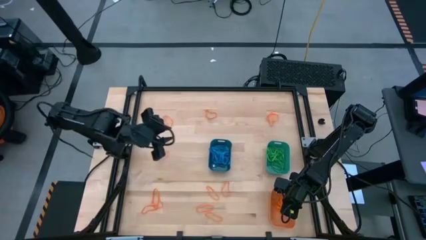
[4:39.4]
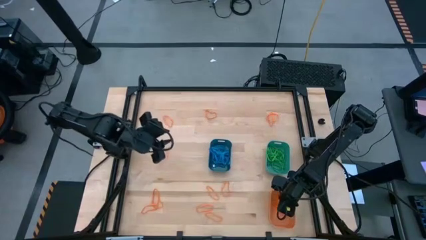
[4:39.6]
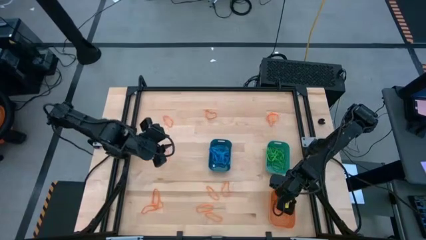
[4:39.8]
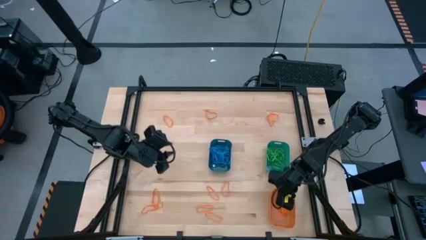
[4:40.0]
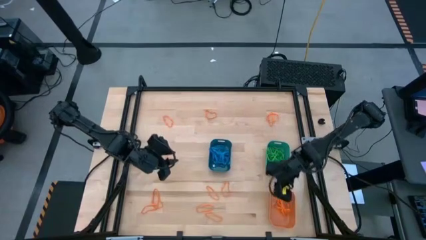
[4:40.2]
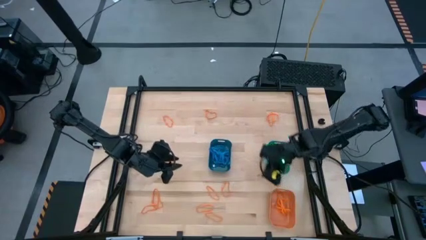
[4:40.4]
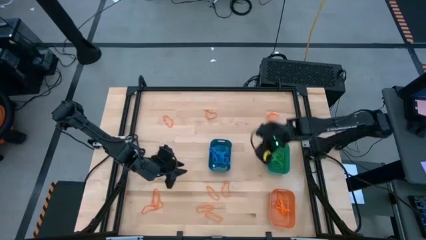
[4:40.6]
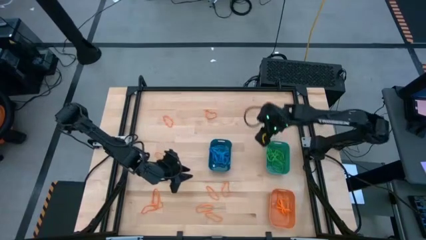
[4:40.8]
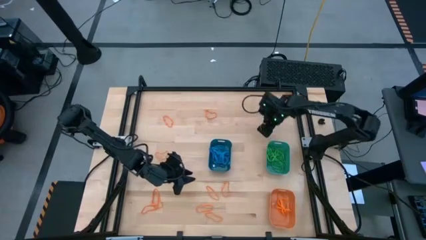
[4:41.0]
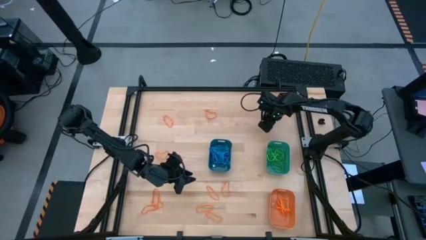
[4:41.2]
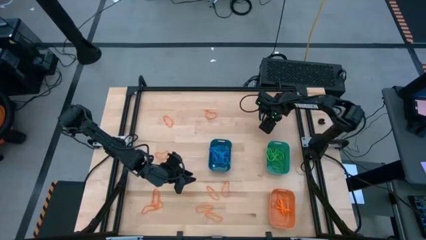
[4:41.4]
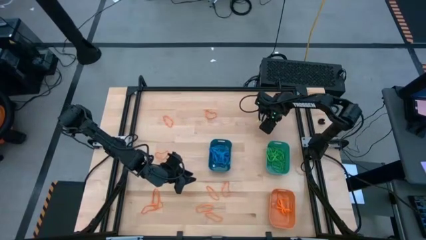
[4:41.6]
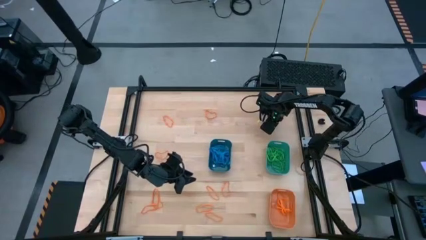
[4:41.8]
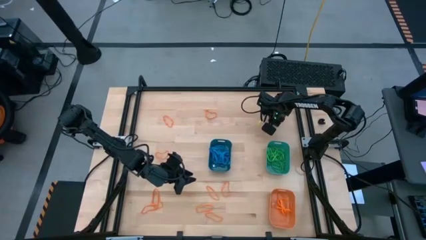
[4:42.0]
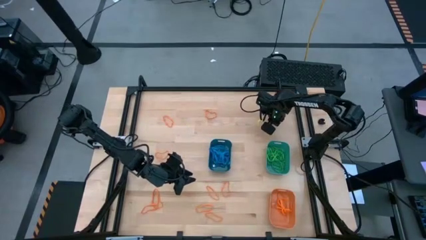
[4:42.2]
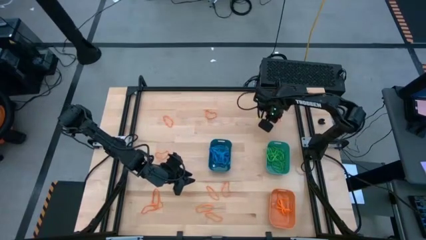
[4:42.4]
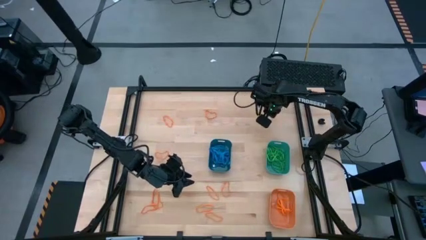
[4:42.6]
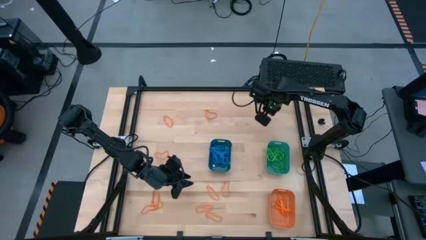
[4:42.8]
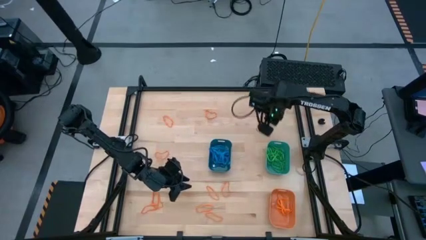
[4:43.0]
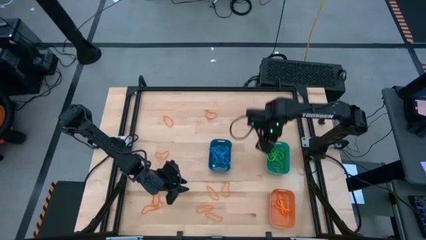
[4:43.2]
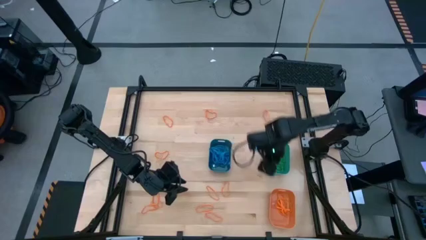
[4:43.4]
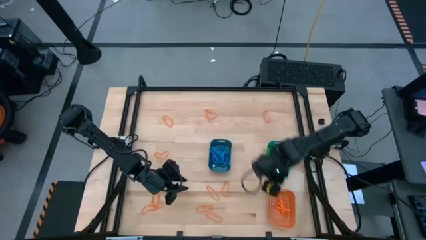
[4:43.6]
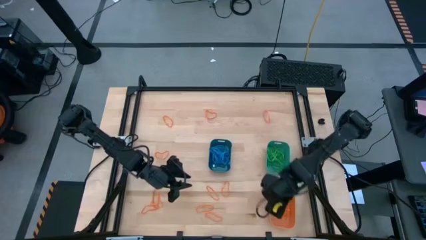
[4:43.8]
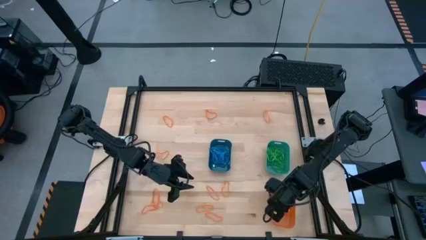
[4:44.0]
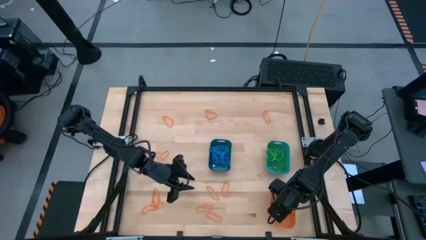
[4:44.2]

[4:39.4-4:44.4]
Task: Sort rubber bands into baskets
Put the orange rubberband into the orange bin

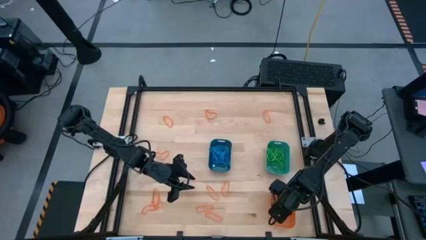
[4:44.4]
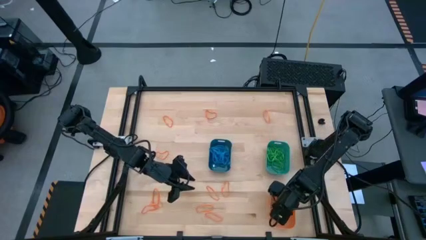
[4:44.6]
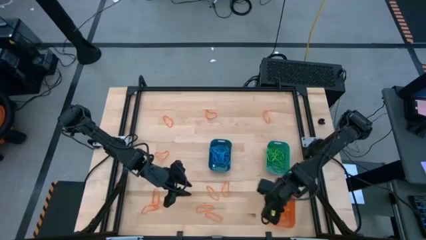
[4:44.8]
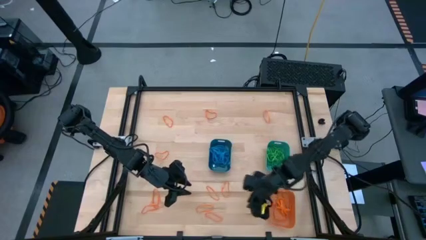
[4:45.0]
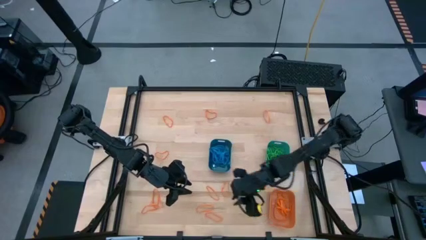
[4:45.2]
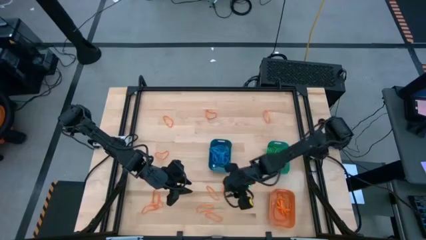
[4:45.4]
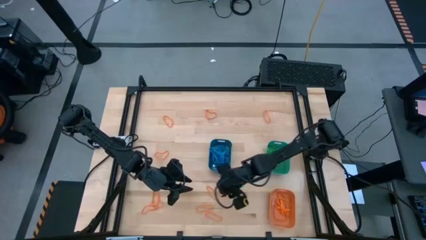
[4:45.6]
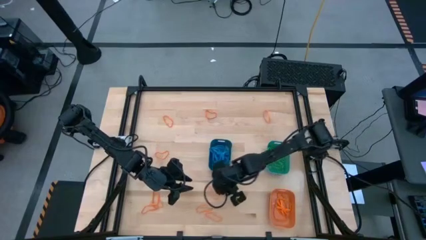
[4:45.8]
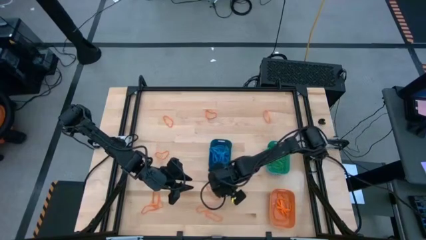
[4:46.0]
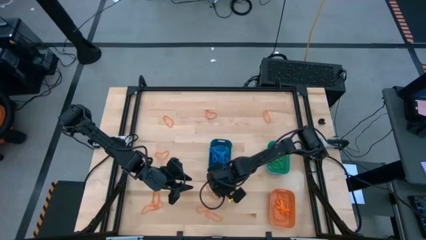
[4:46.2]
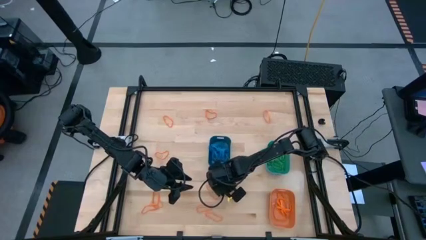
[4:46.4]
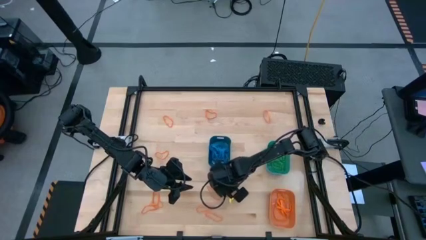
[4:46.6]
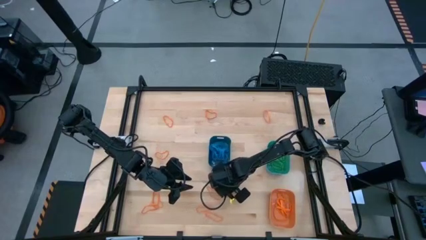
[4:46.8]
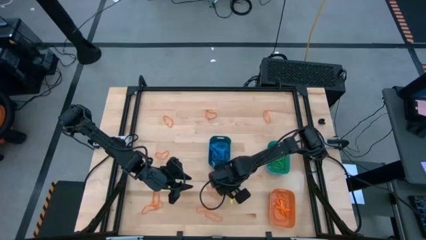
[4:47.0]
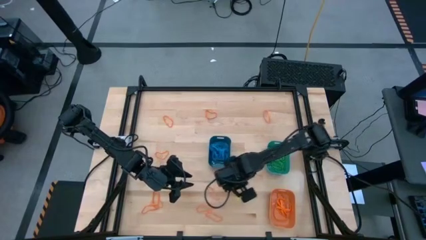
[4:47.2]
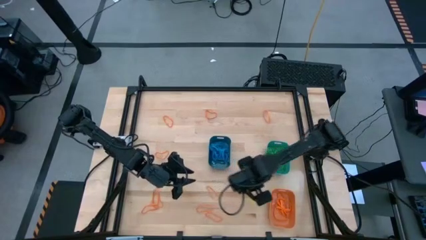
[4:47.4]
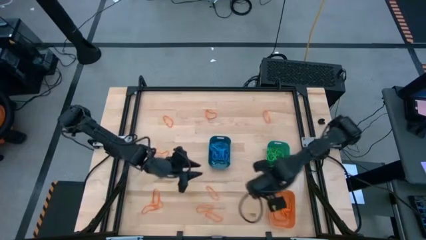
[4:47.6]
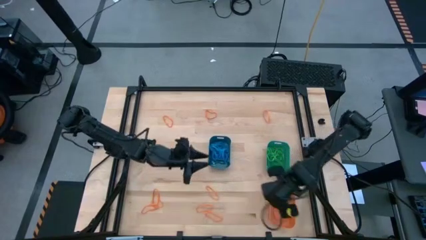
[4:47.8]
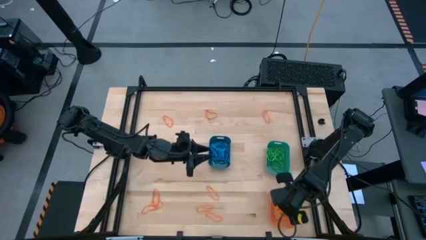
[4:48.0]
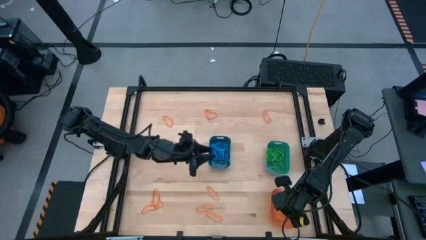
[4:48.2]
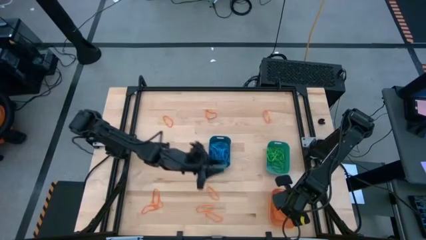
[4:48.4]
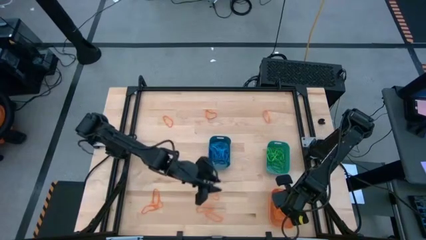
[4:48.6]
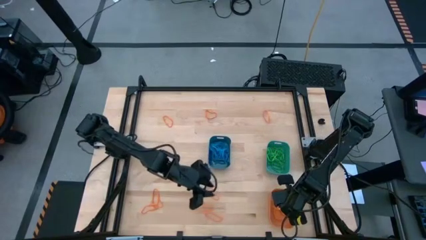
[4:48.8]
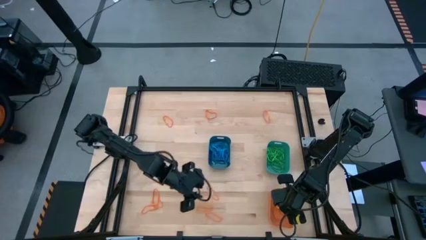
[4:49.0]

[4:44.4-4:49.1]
Put the orange rubberband into the orange bin

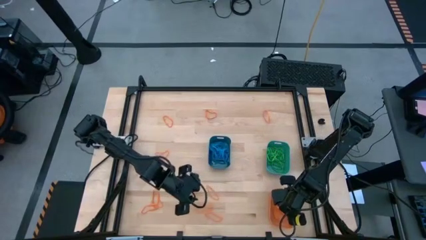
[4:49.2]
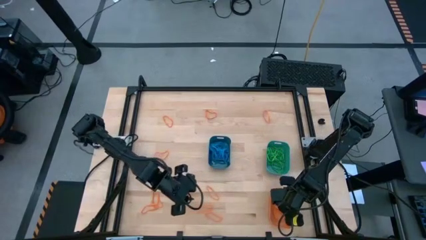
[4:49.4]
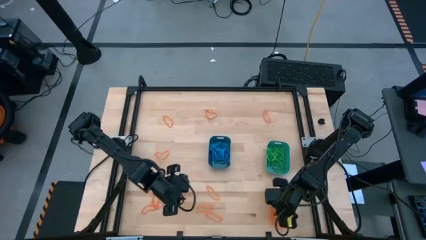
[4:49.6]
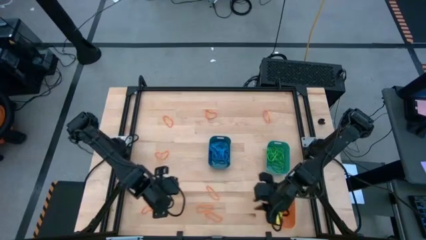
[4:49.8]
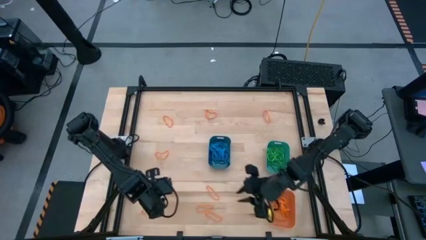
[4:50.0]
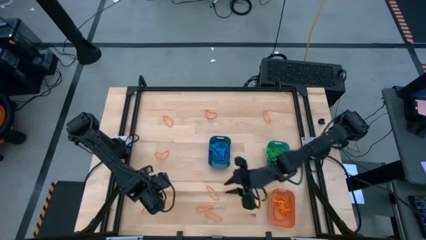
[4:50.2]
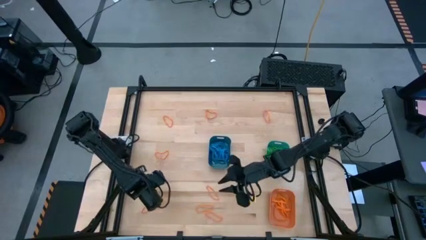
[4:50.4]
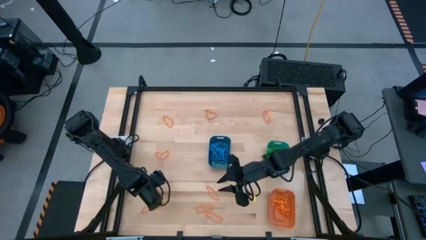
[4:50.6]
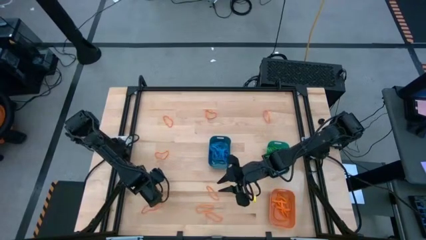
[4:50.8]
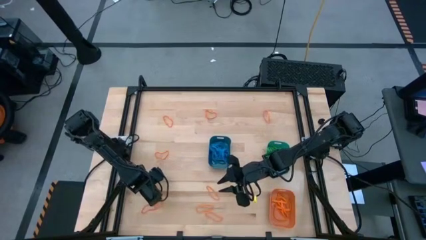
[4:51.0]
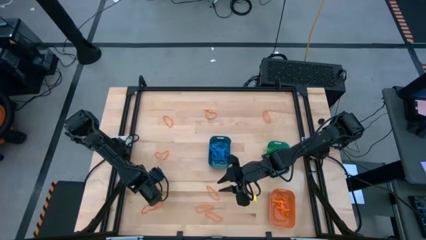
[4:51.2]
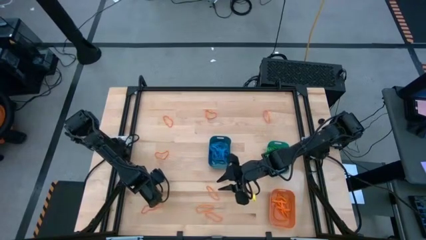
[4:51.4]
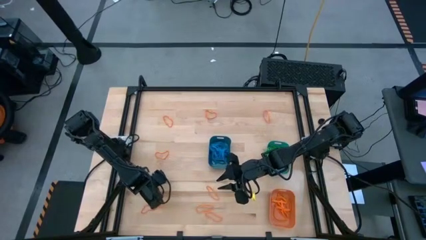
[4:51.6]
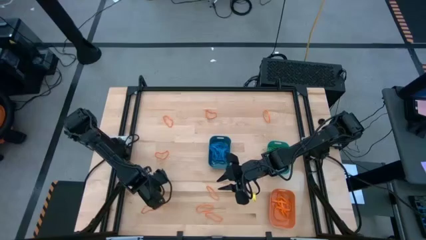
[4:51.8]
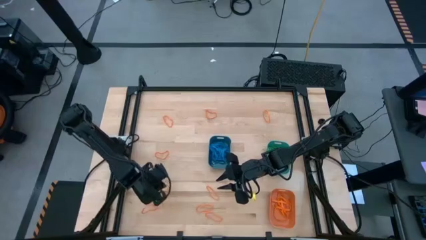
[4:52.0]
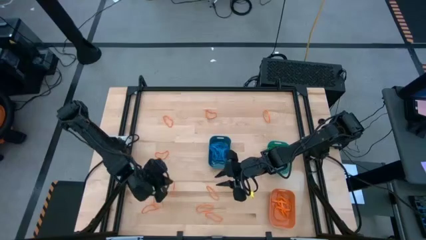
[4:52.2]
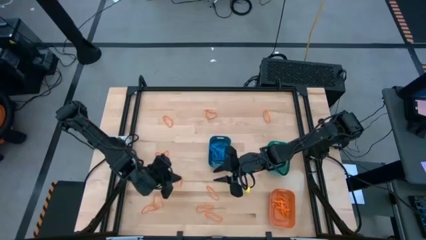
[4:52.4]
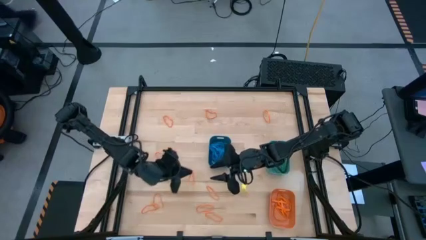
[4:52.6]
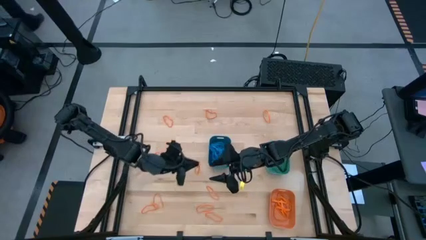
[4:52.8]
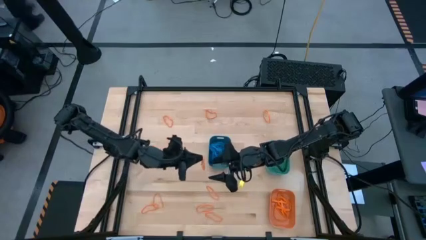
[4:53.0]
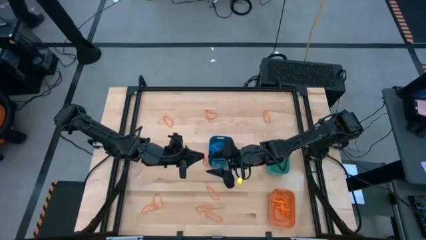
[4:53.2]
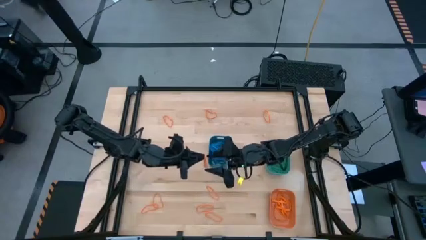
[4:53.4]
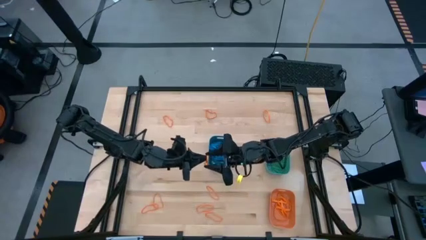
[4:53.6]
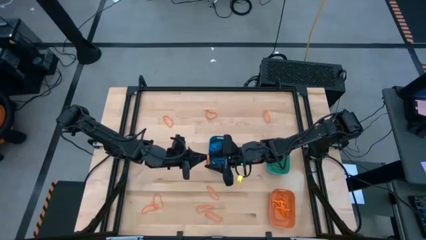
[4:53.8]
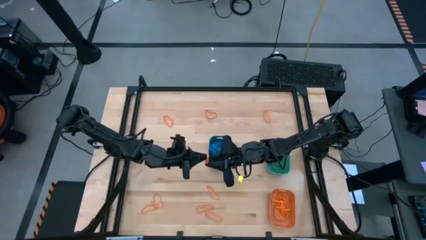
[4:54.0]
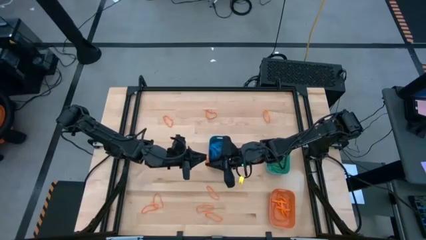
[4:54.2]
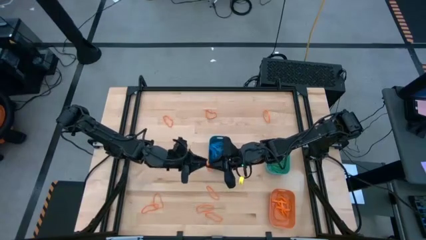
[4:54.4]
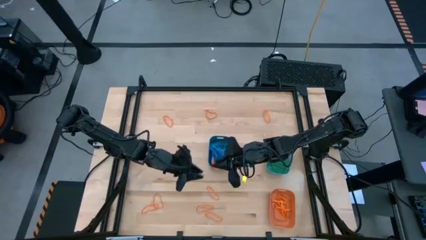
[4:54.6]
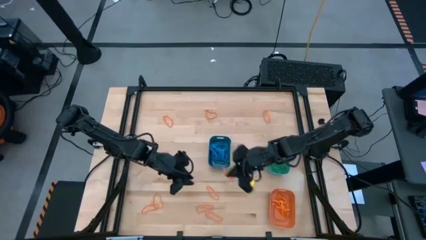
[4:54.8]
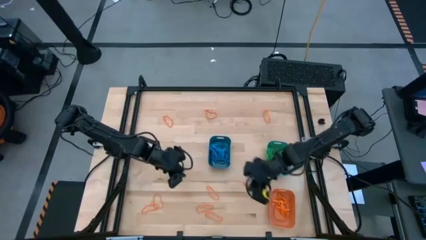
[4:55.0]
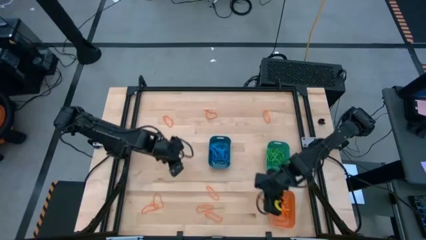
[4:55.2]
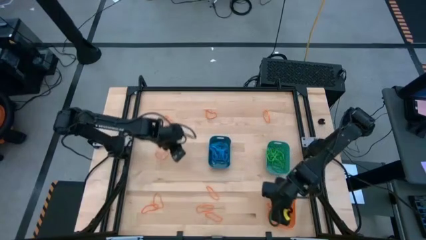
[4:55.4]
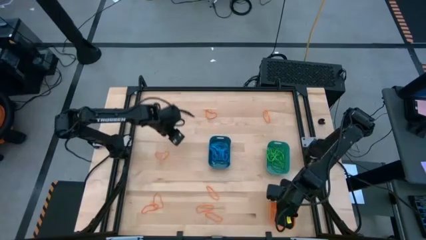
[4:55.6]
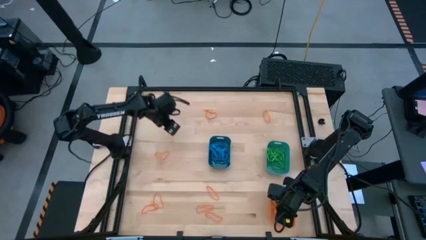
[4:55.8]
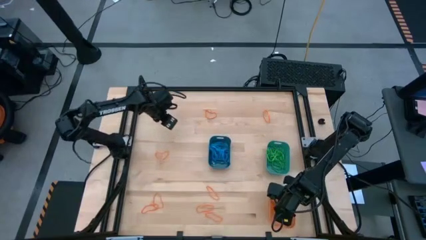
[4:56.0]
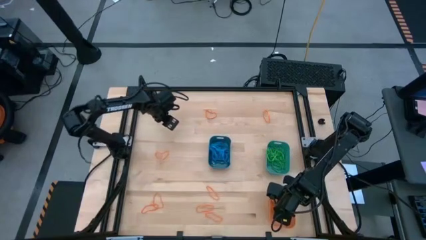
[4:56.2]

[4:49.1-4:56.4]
Put the orange rubberband into the orange bin

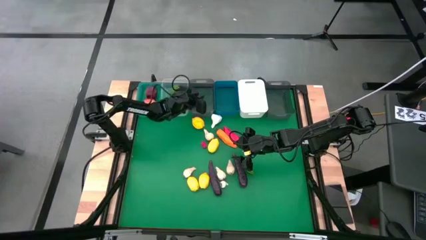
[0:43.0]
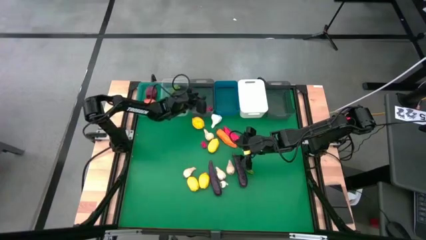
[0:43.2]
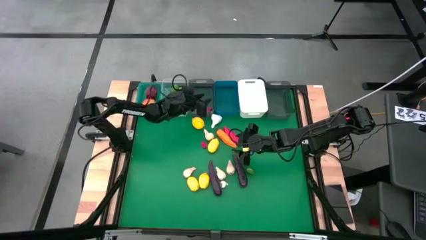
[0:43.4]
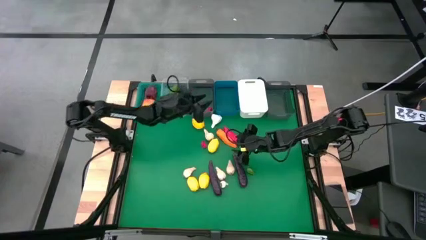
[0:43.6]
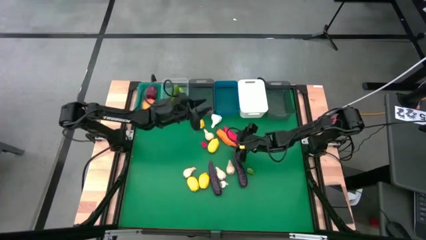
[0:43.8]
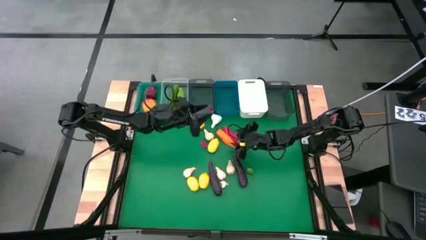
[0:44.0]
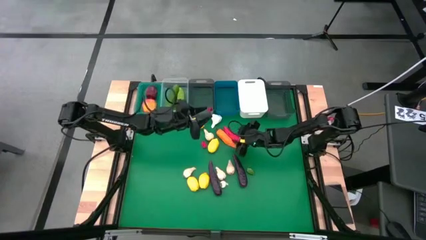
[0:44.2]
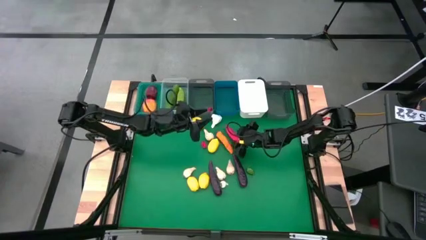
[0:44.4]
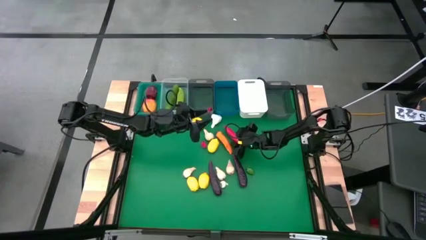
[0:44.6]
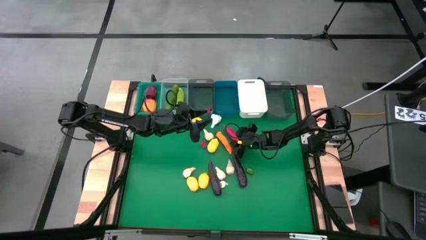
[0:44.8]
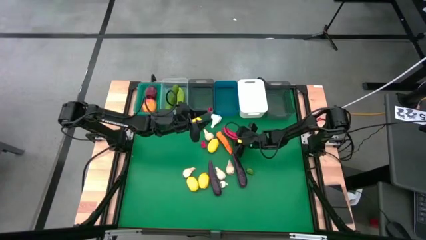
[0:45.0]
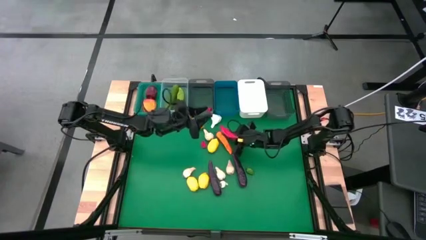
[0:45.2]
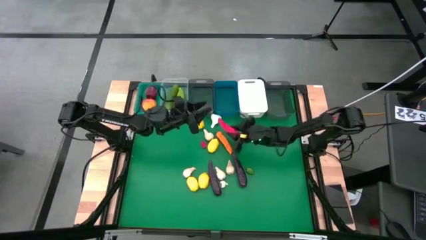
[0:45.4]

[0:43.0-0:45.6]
Task: Sort produce into baskets
Put the red chili pepper into the left black bin
